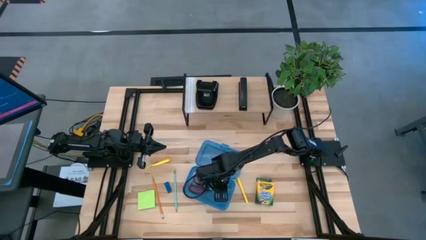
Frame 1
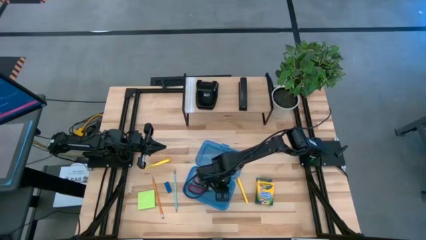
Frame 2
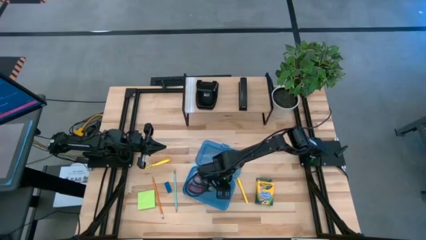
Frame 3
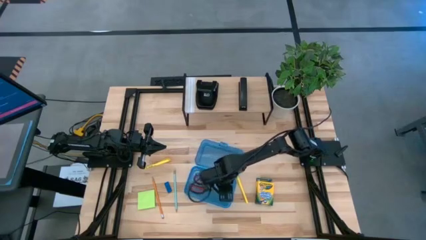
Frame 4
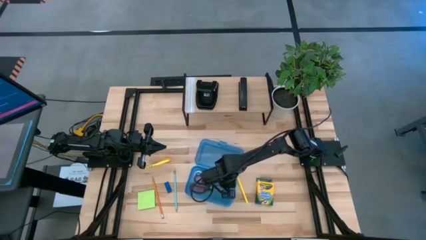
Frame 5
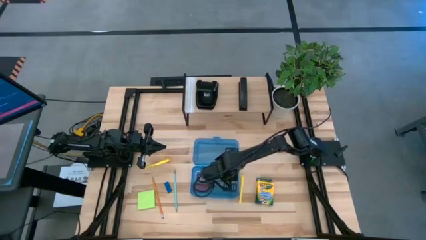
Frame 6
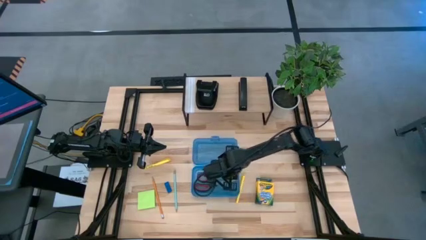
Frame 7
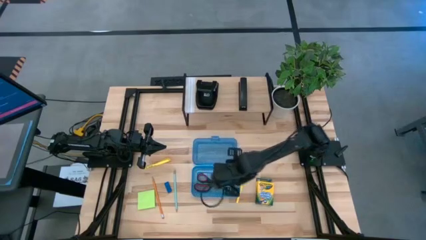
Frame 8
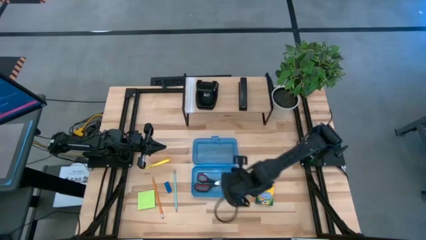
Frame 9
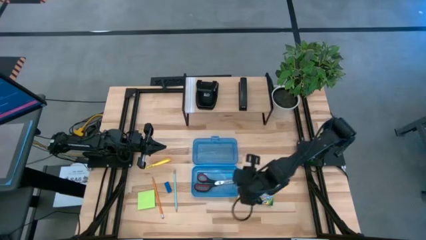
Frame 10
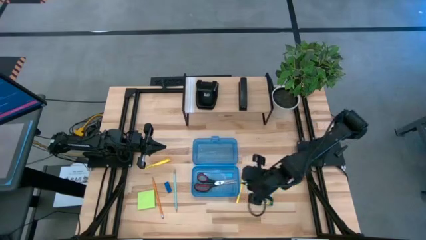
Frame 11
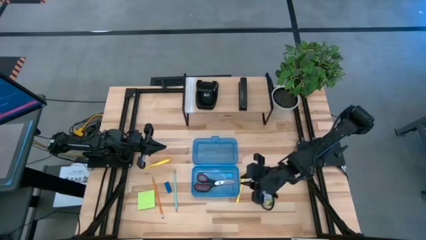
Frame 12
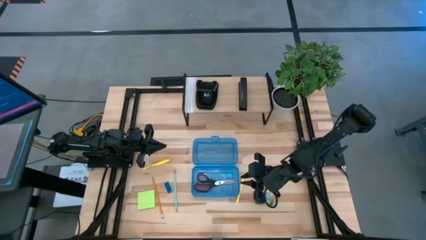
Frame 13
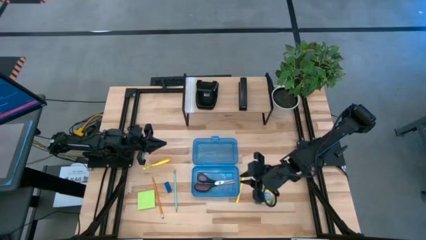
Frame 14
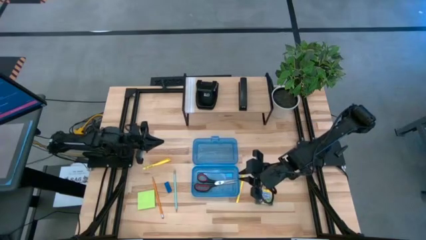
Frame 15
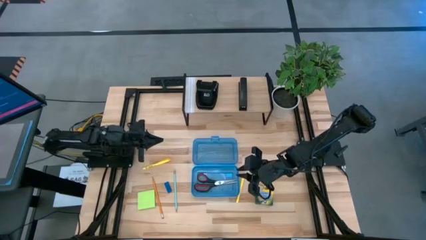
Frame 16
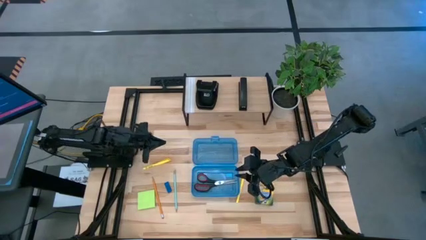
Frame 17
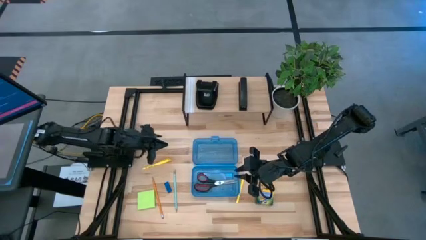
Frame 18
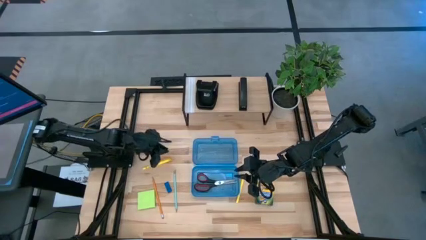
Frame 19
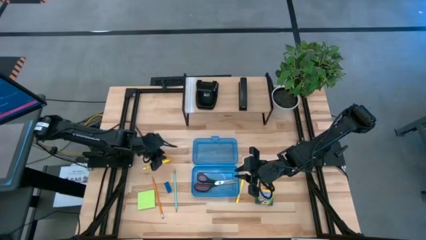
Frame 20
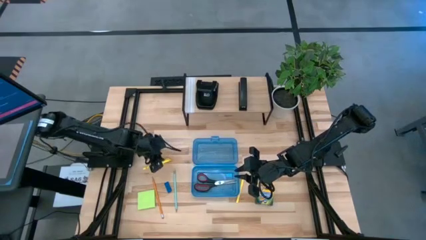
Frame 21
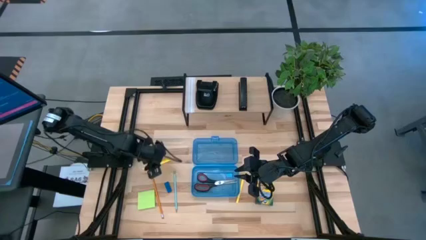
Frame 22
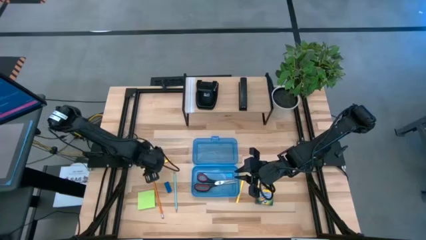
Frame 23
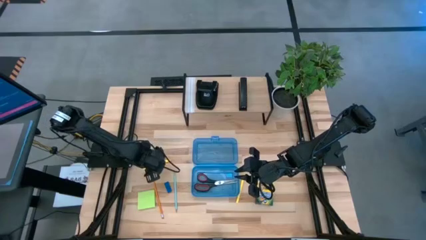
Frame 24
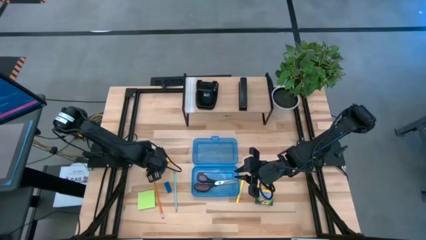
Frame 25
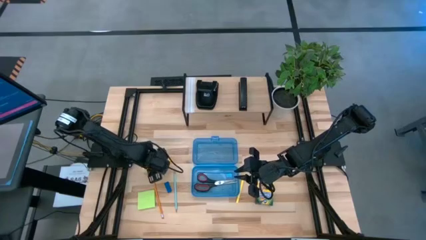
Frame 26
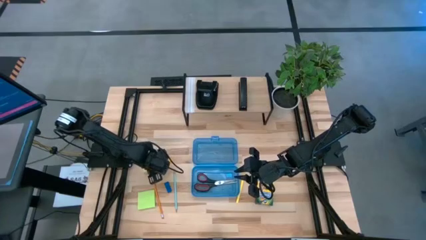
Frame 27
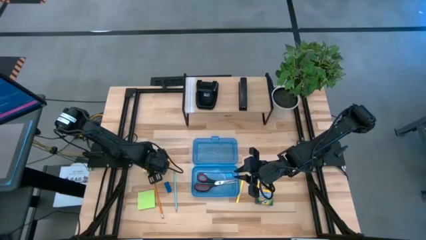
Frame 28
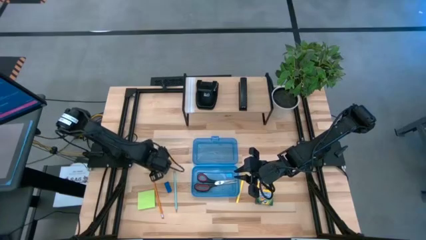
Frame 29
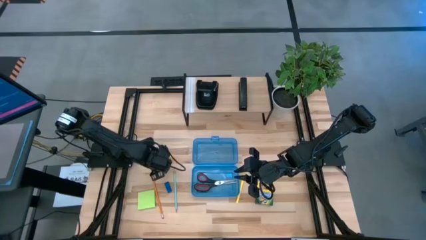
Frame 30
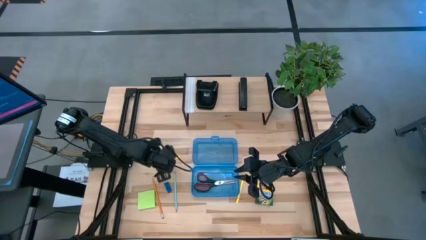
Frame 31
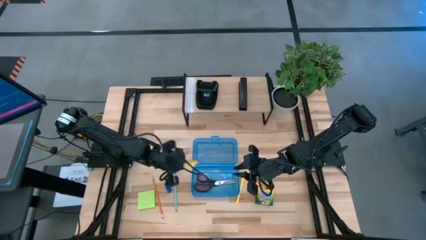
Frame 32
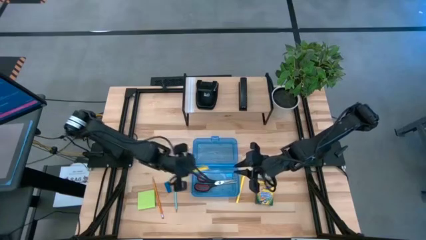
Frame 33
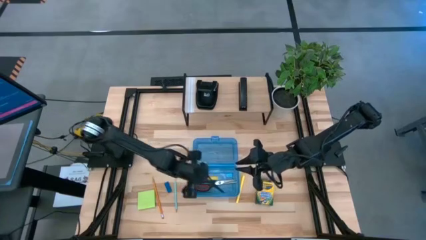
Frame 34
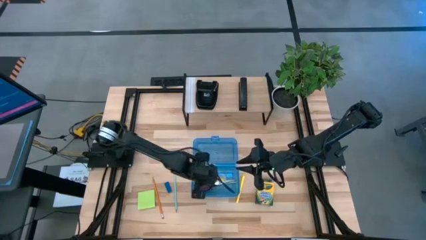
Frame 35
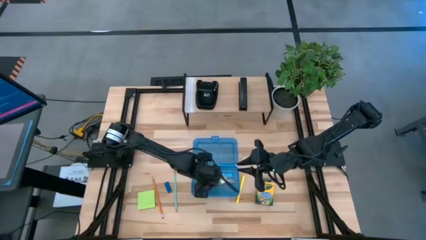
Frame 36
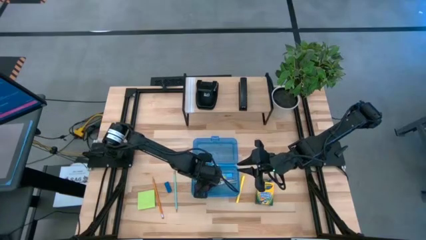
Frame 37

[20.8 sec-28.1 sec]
Task: Pack school essentials
Put the yellow highlighter pen into the supply box

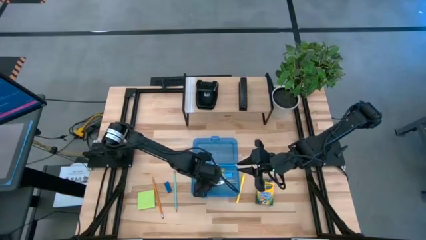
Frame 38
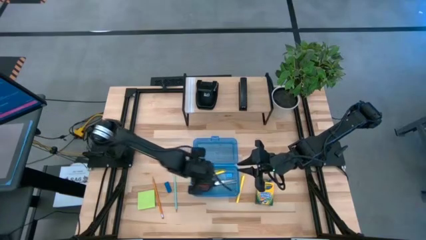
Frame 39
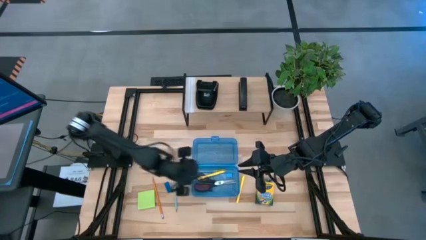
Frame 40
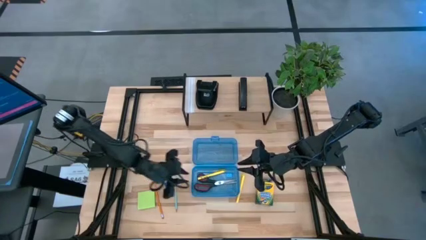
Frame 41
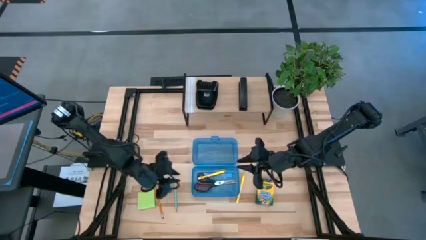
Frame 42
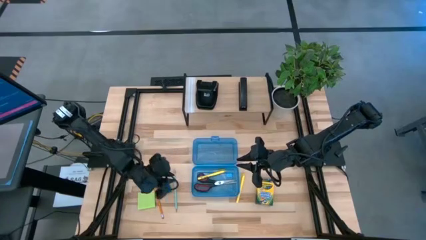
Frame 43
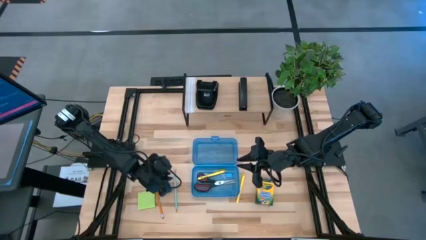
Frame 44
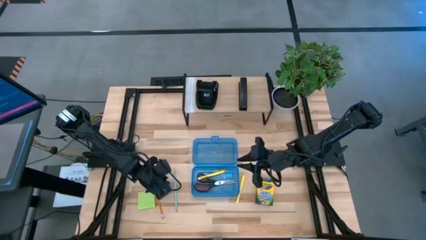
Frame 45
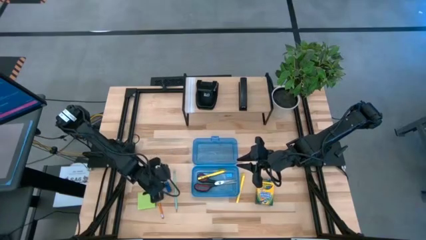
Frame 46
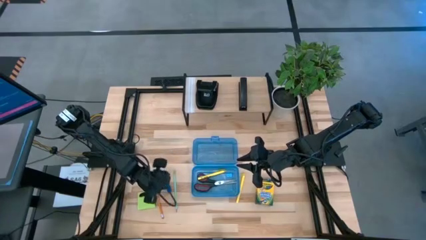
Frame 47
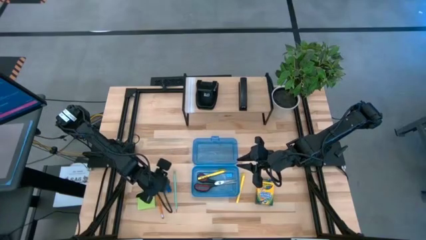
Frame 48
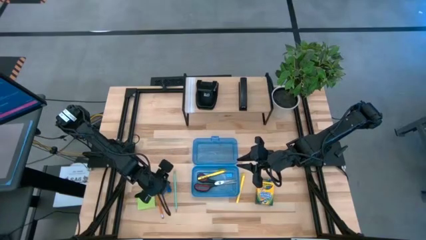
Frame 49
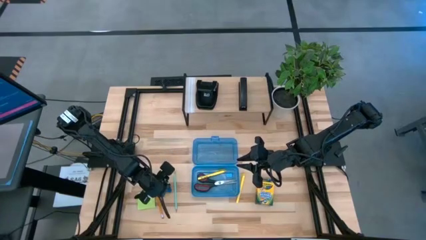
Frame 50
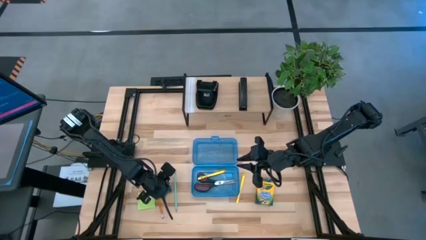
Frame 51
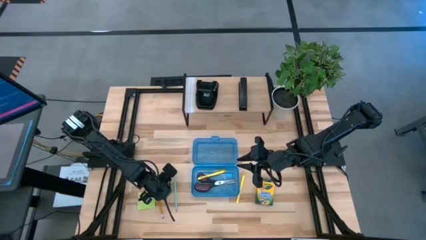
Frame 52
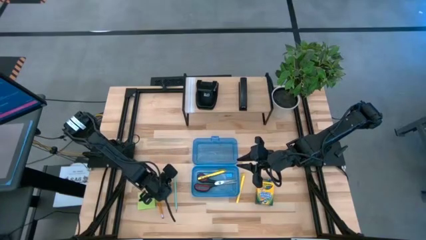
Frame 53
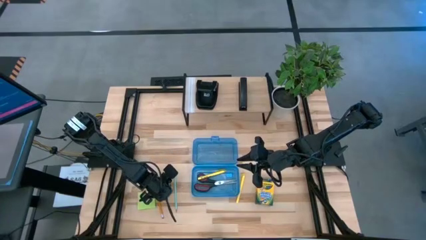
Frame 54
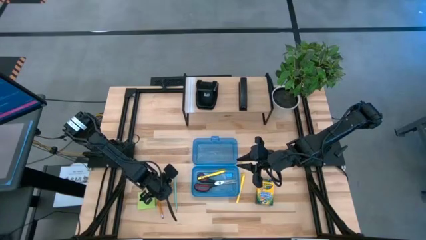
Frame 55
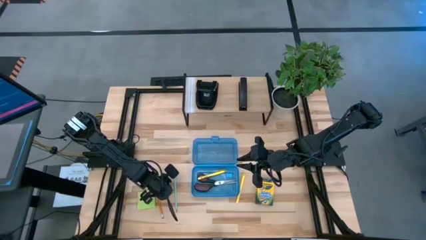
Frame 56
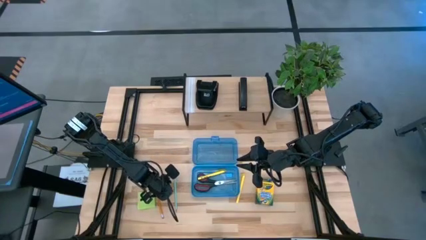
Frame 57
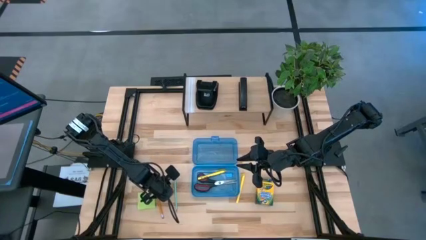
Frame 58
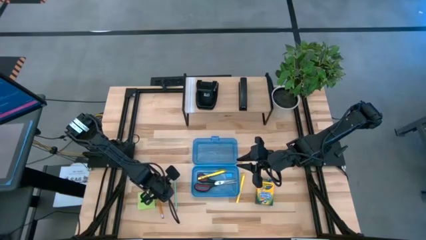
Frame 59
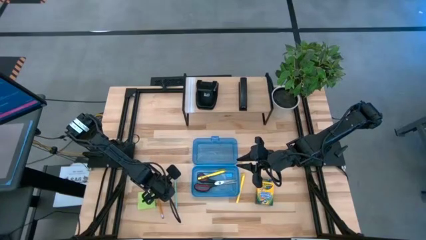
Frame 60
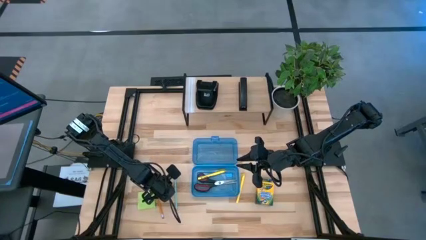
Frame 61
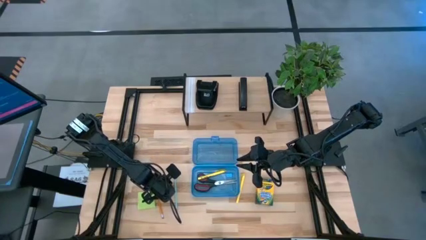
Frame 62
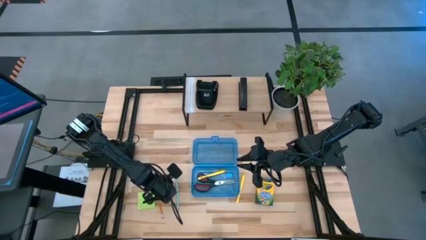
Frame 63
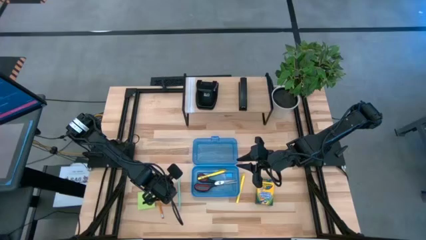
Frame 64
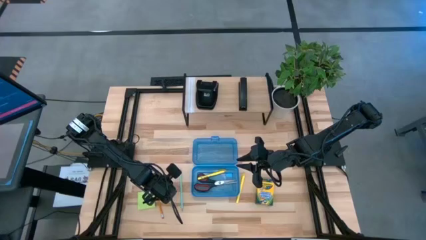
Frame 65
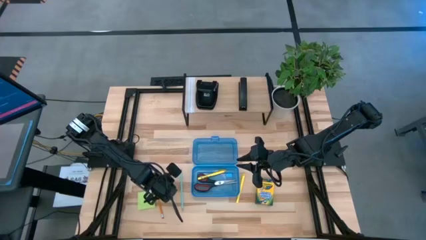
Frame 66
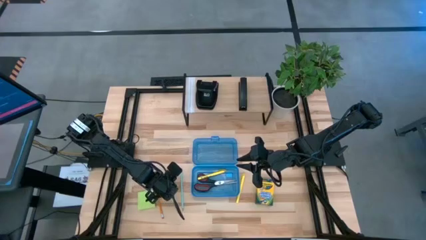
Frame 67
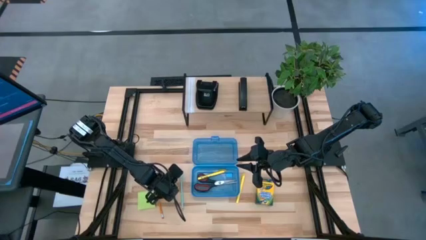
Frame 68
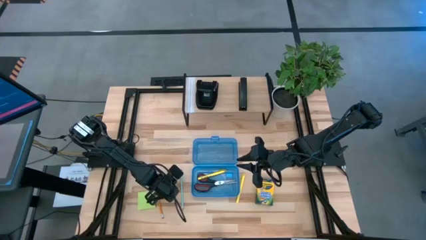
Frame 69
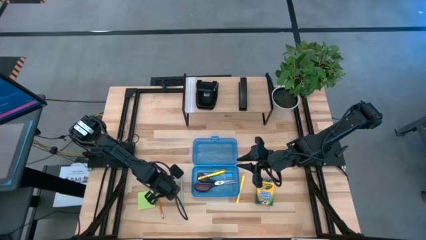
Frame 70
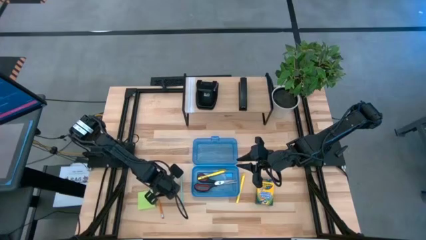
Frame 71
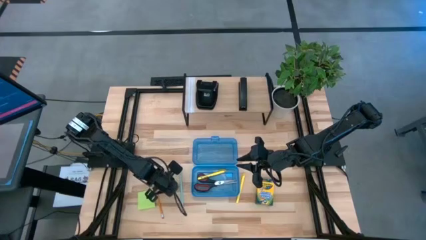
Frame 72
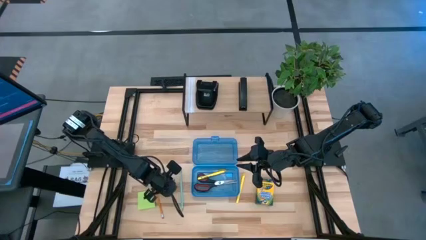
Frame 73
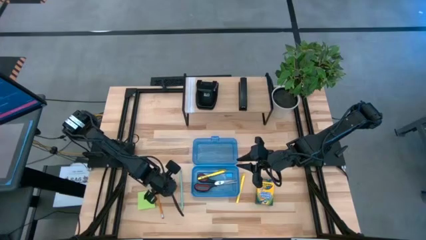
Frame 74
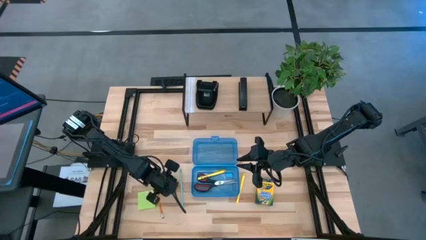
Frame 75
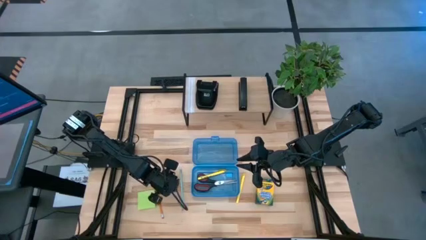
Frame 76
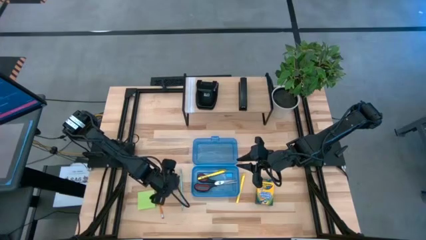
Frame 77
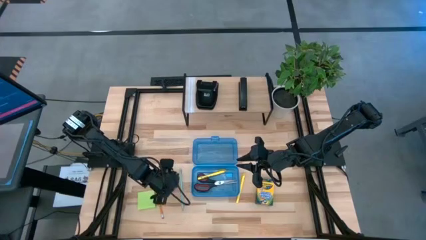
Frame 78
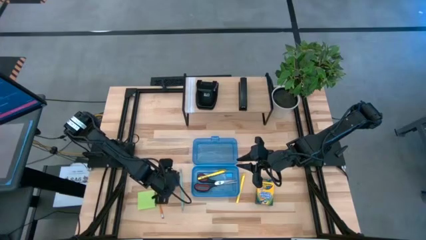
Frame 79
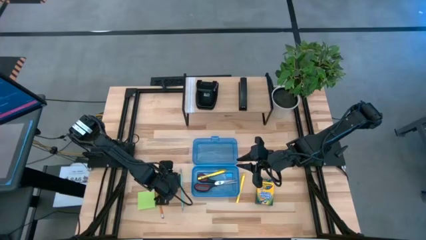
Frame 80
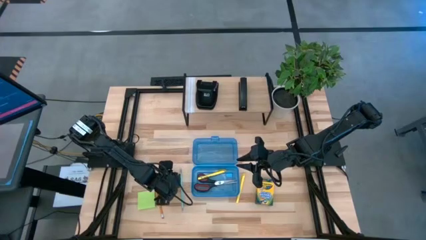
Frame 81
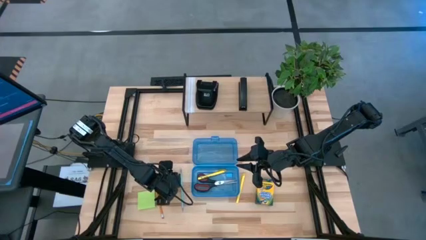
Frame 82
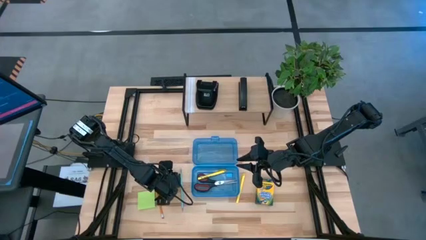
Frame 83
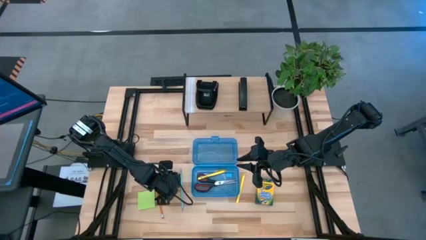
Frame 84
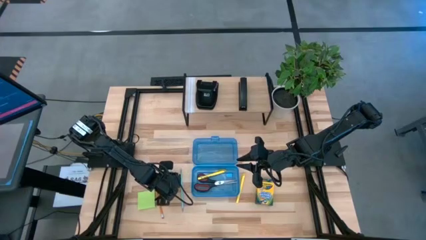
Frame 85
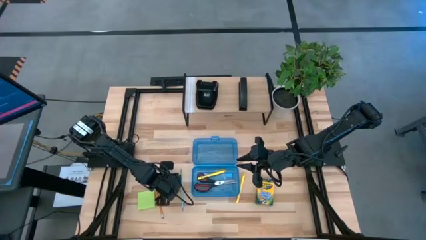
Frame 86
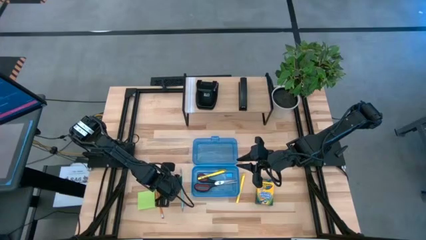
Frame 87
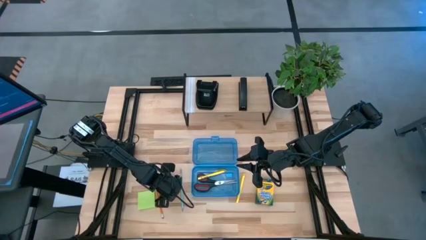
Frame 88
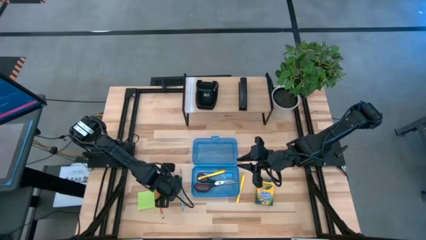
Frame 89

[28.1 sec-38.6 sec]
Put the blue eraser into the supply box
